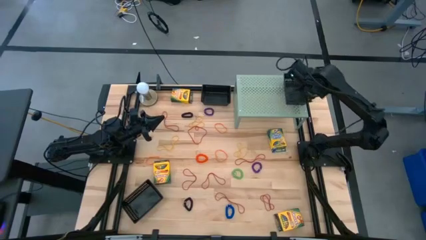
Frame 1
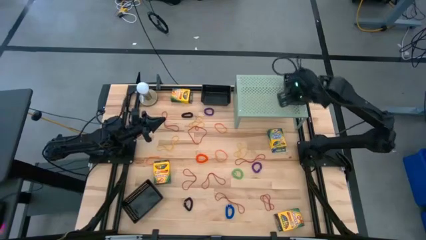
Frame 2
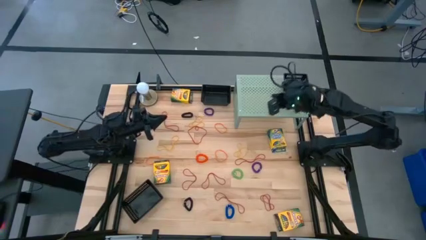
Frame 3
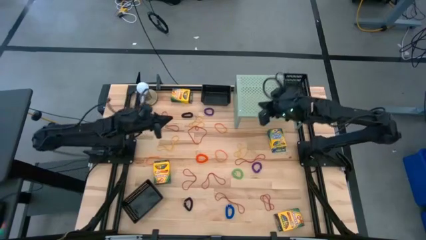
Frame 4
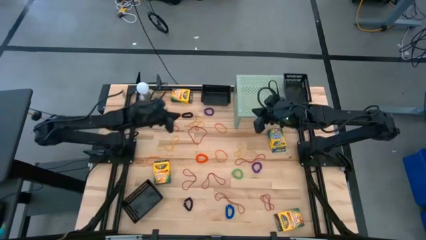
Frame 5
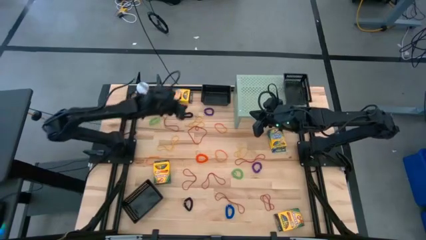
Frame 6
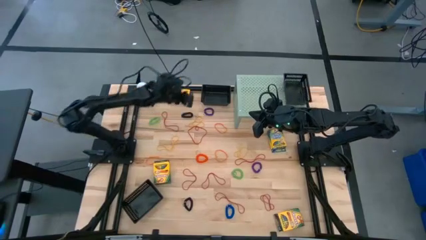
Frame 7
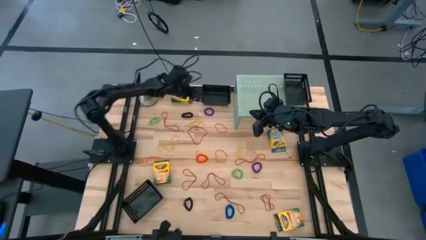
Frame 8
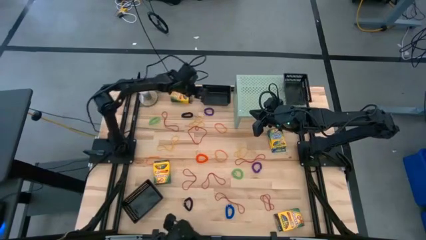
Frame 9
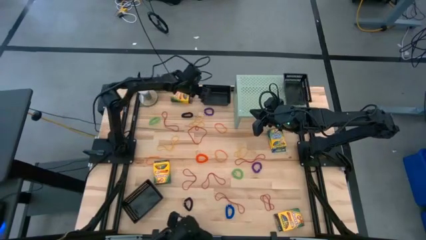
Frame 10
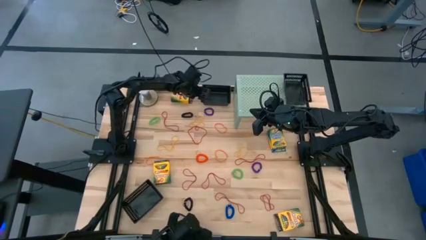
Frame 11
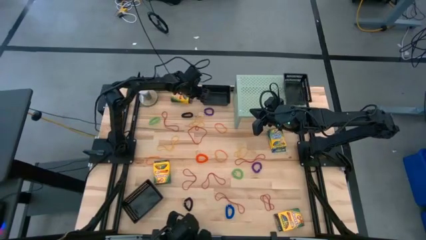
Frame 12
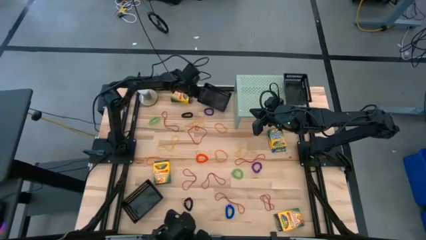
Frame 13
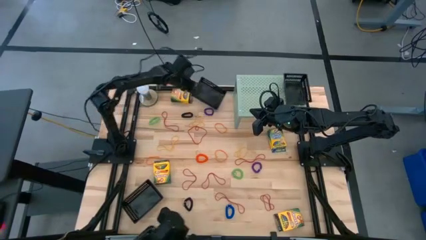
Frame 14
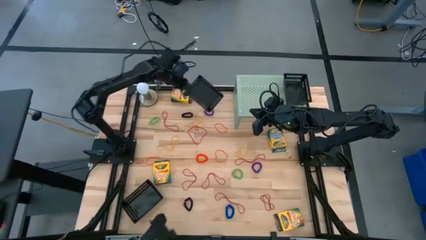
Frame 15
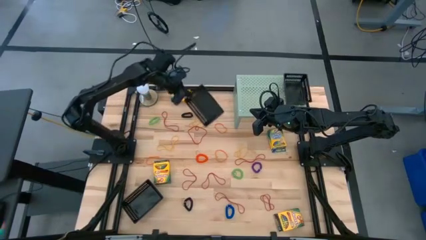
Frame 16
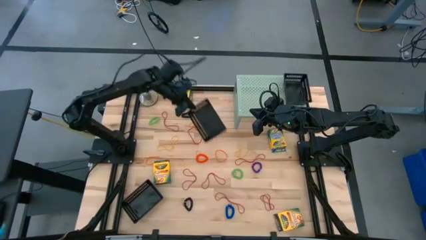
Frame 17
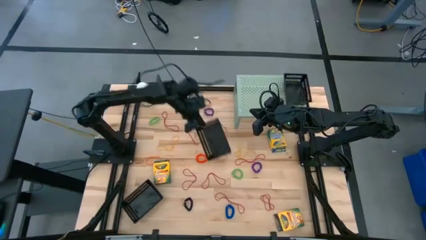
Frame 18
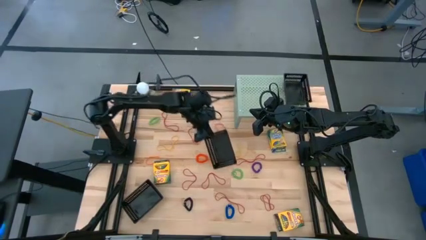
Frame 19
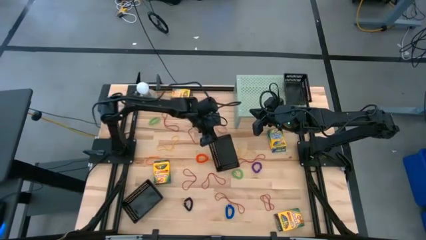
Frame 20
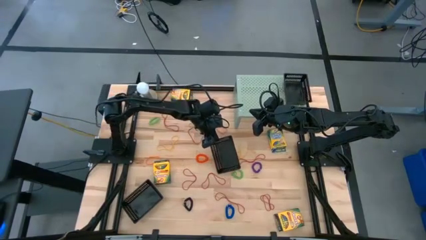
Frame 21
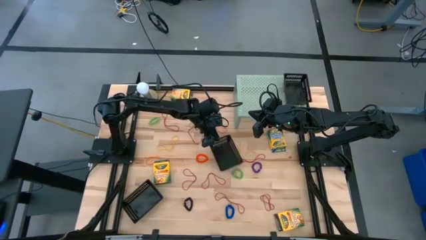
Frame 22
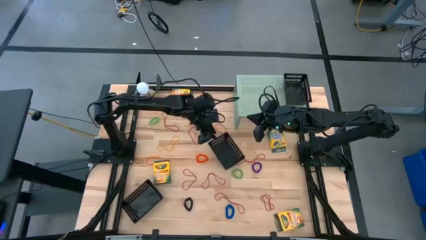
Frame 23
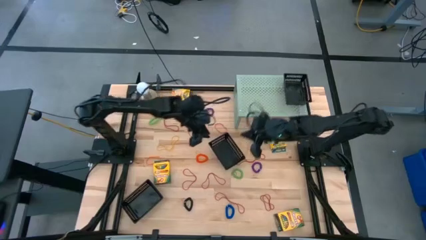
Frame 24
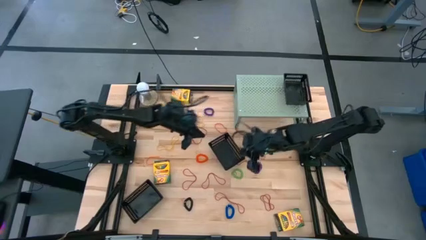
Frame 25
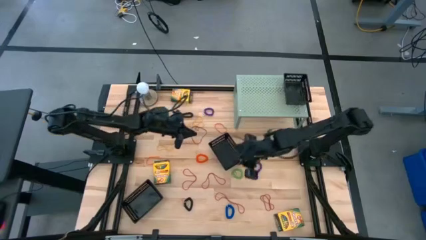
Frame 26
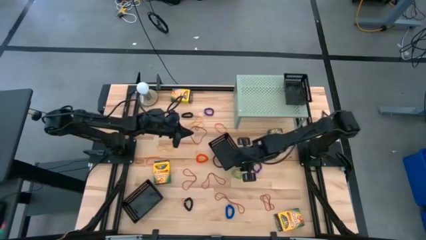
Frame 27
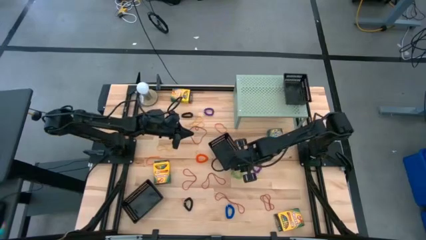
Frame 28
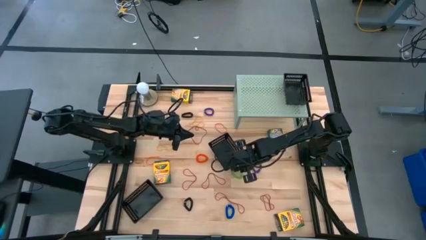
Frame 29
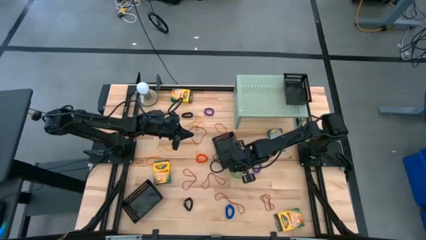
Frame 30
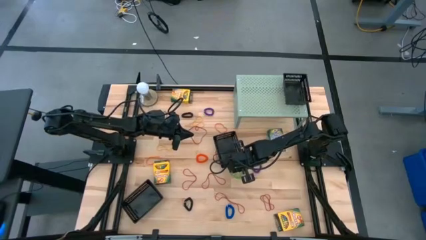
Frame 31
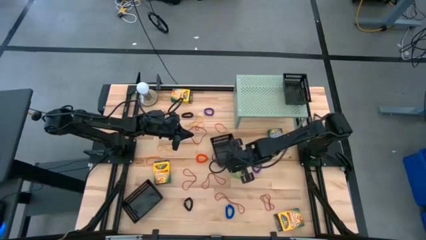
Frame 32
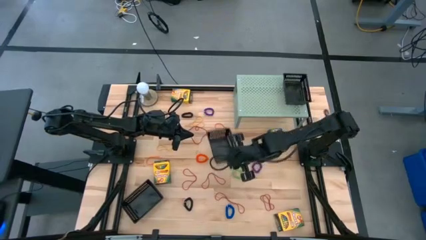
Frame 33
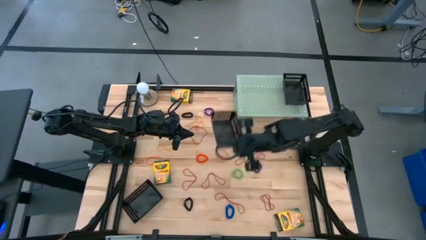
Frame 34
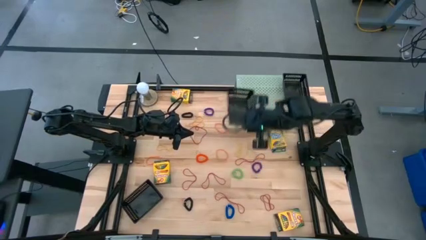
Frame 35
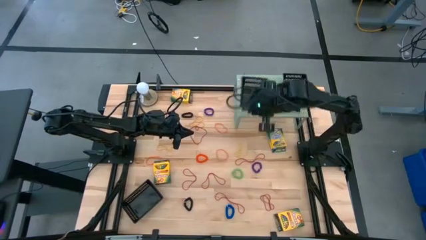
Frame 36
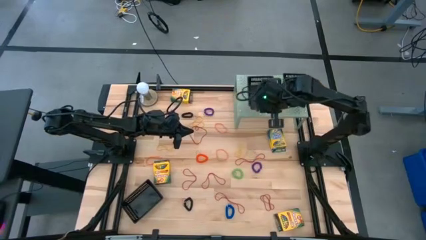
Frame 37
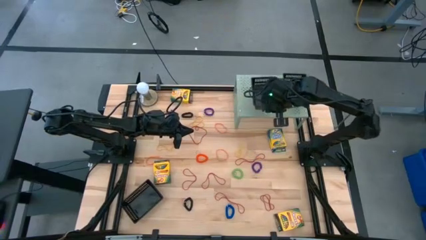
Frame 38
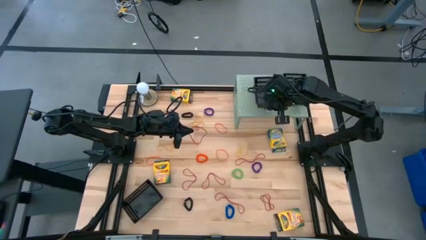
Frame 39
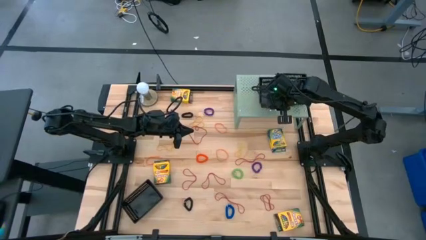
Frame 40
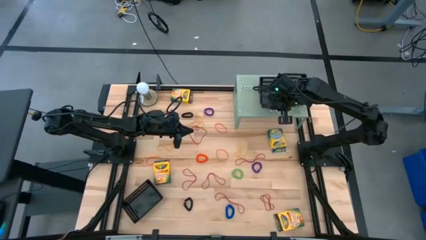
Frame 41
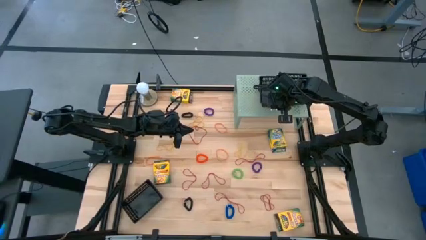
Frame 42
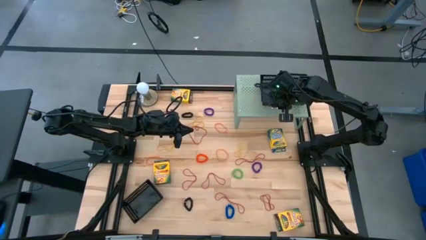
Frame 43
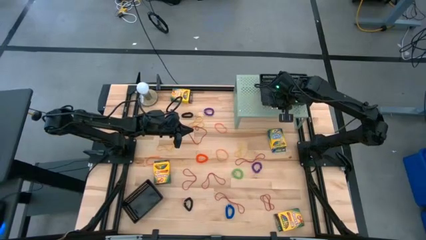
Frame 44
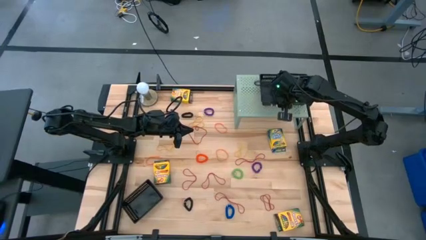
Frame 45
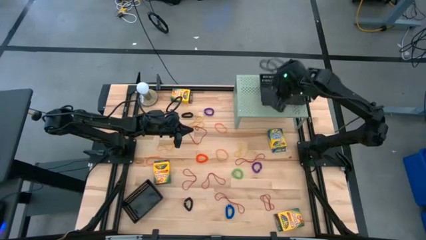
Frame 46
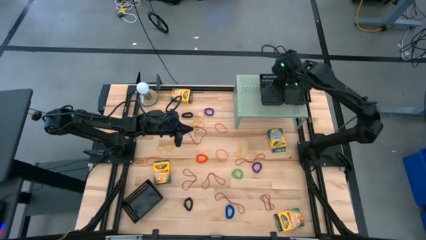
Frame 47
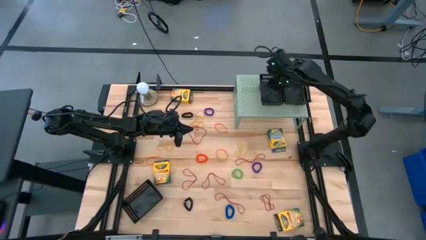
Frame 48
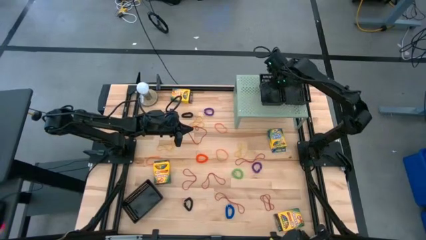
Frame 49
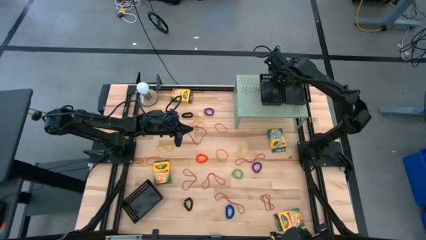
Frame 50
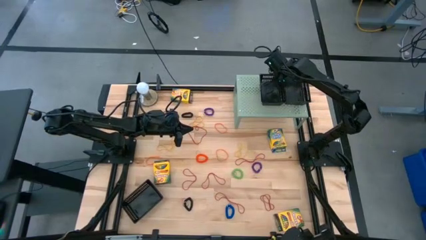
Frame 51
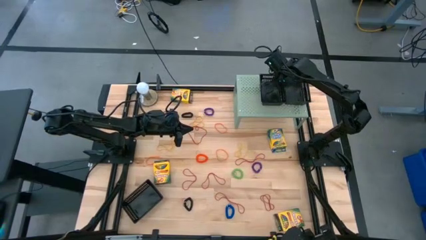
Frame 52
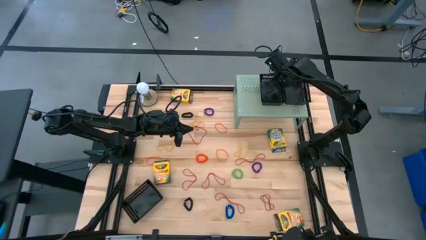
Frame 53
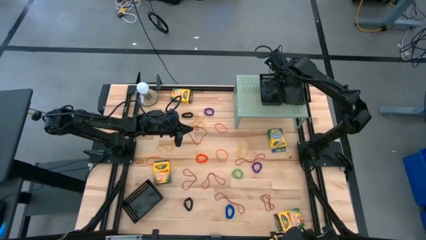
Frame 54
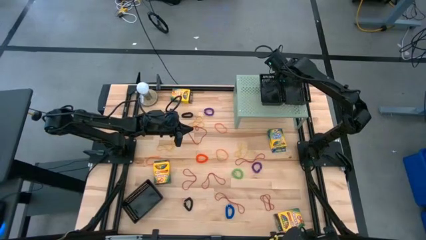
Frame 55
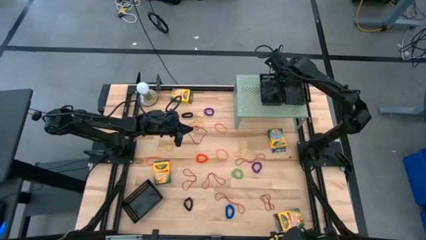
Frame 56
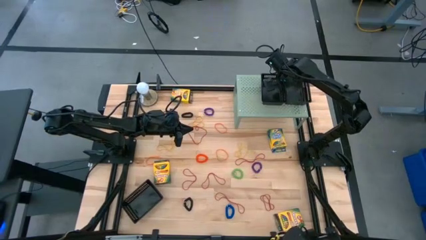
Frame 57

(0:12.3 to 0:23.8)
Task: Pick & Place Office Desk Supplies
Put the top black basket on the shelf on the shelf
